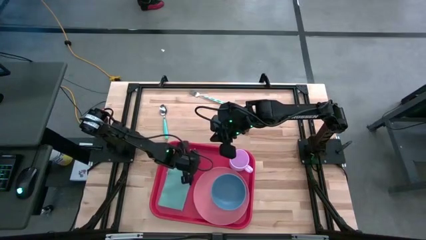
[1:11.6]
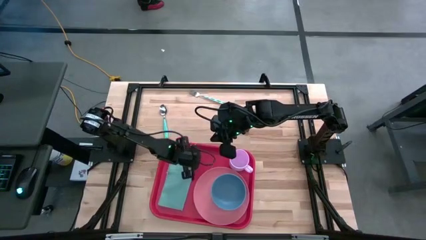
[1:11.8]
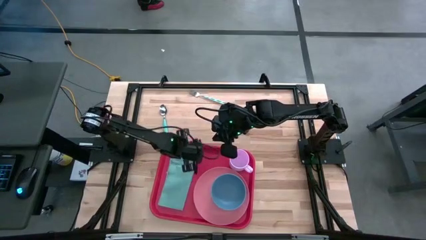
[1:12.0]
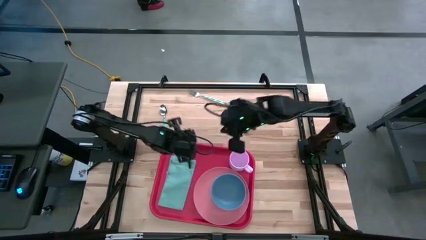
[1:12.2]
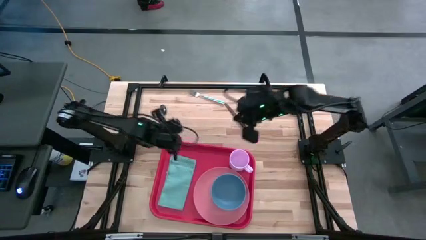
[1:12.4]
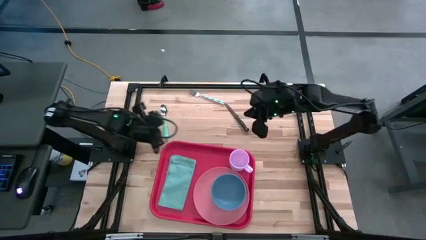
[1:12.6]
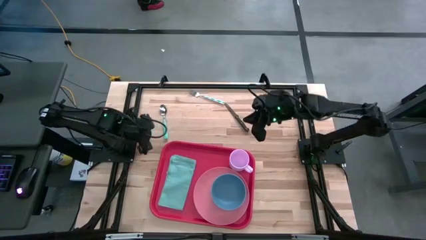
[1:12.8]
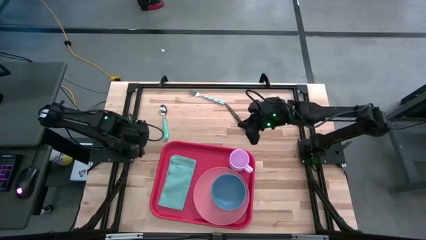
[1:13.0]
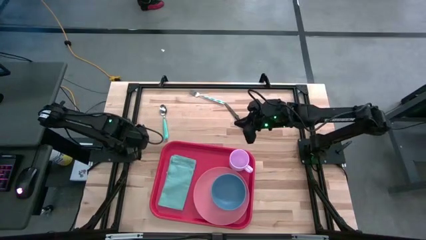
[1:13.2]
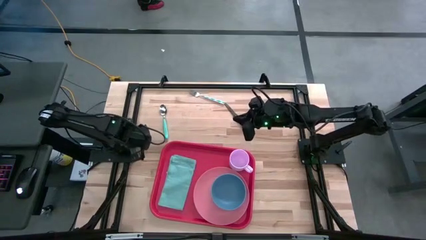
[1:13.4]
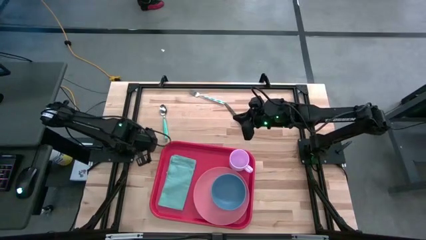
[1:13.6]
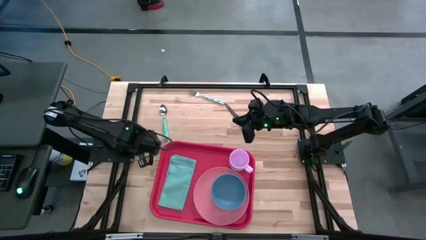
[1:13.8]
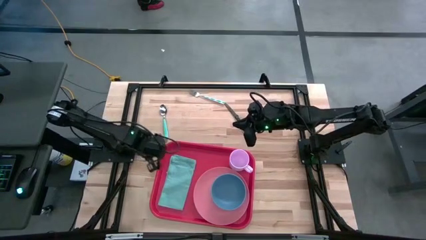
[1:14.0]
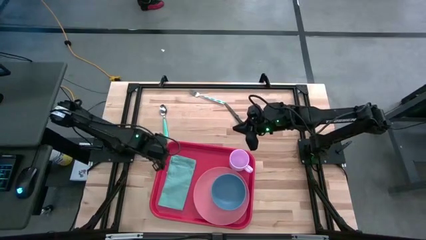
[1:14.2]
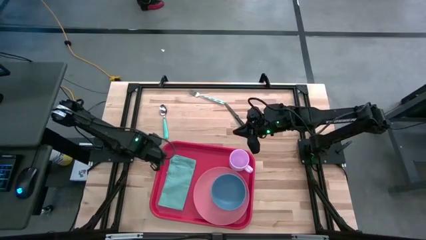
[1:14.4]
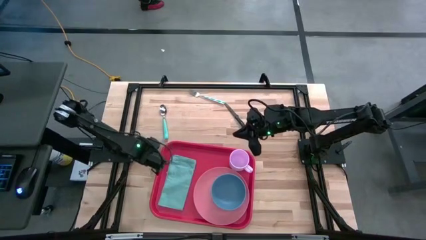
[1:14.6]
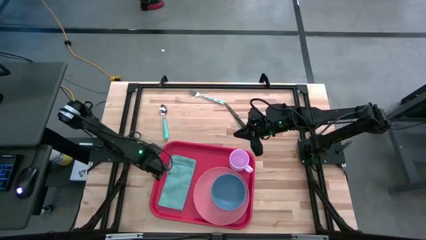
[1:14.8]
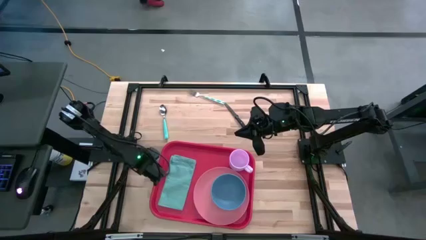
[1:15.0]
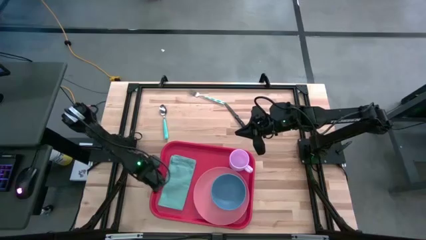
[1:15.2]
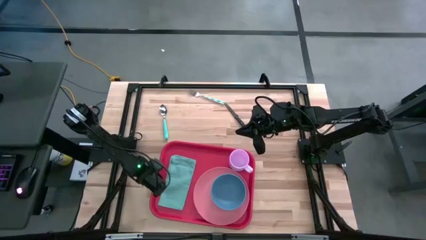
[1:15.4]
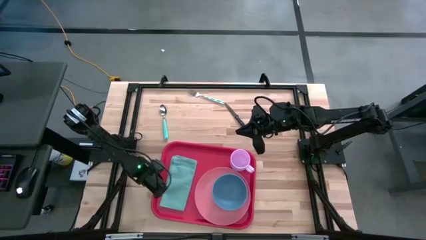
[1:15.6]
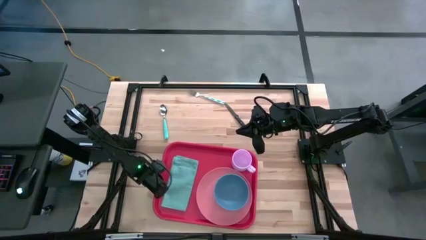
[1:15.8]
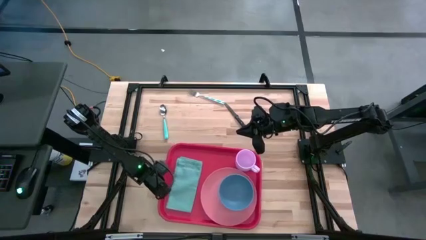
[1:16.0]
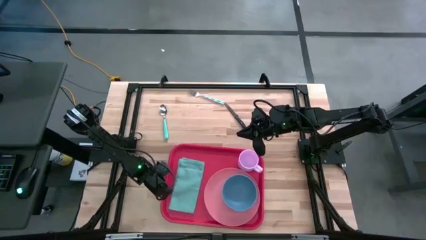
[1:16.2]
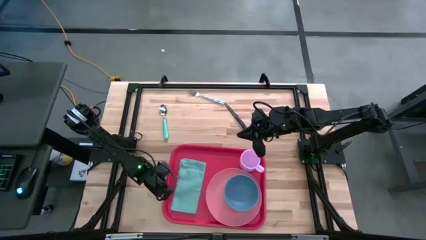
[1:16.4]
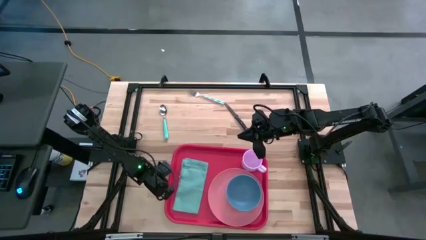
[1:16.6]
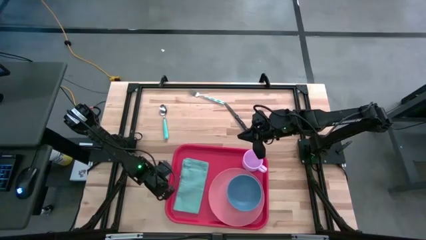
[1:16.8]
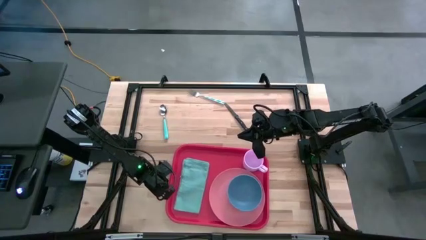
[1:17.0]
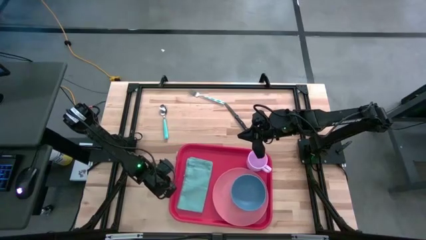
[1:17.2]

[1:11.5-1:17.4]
Task: Set up tray
Adjust the red serving tray

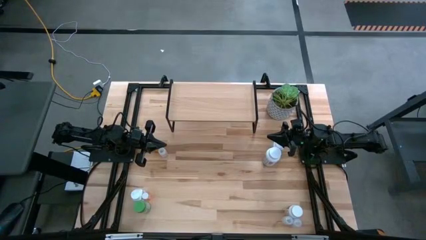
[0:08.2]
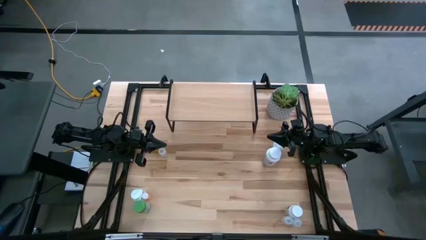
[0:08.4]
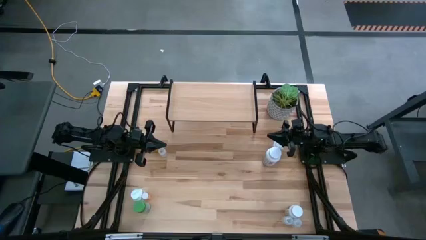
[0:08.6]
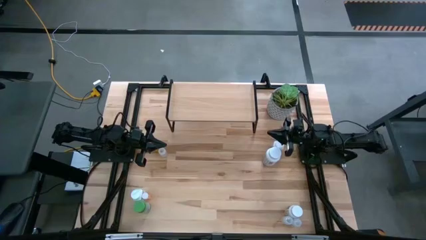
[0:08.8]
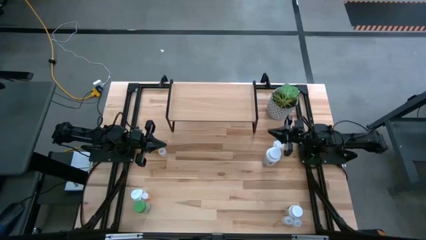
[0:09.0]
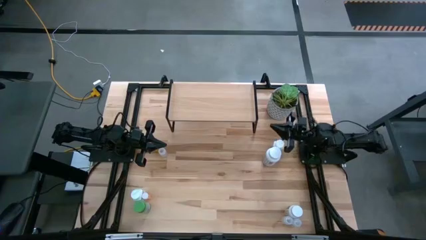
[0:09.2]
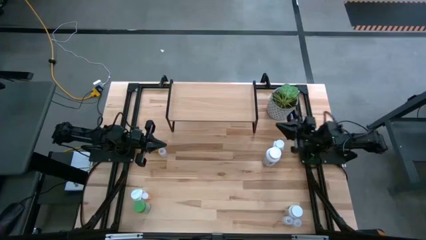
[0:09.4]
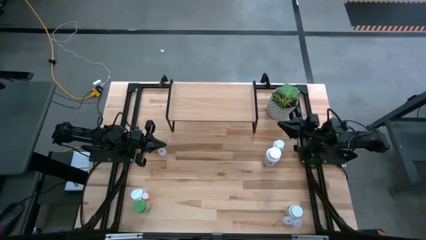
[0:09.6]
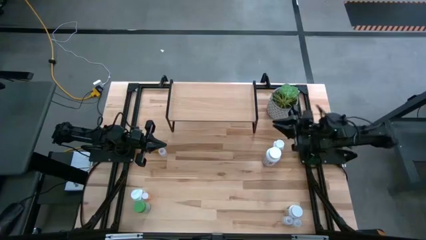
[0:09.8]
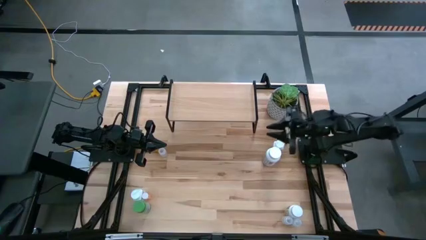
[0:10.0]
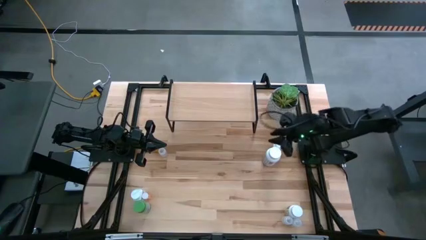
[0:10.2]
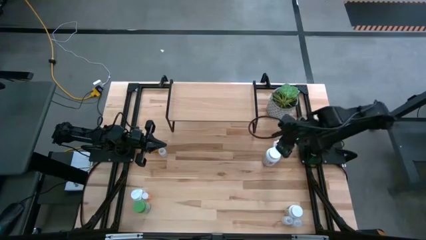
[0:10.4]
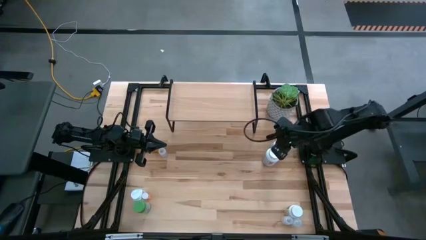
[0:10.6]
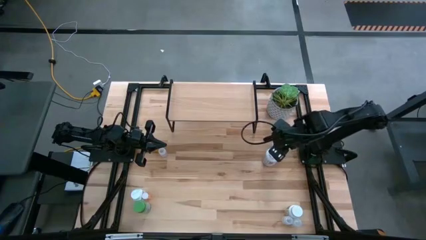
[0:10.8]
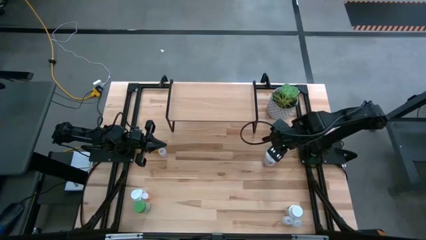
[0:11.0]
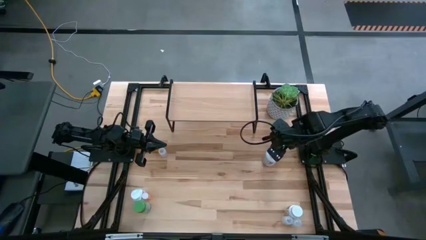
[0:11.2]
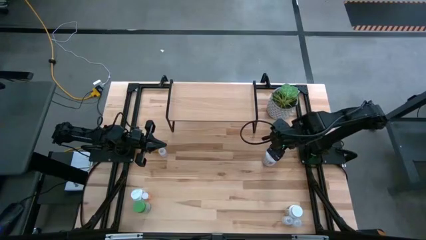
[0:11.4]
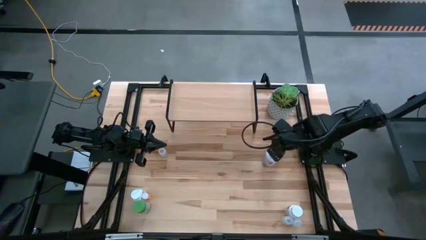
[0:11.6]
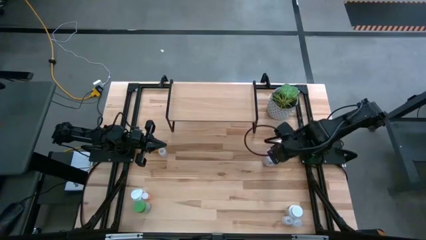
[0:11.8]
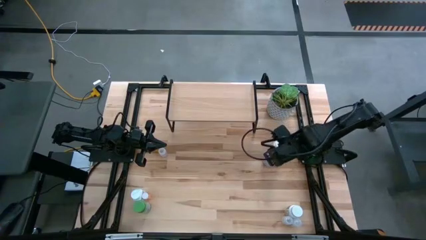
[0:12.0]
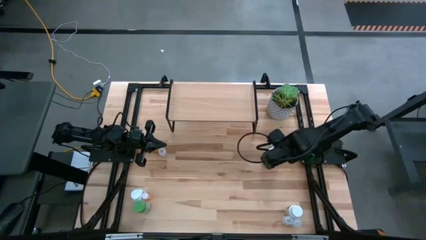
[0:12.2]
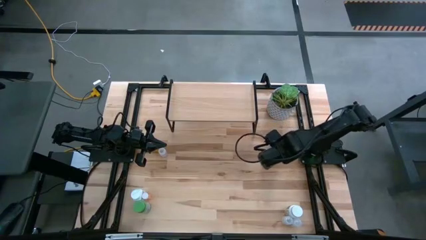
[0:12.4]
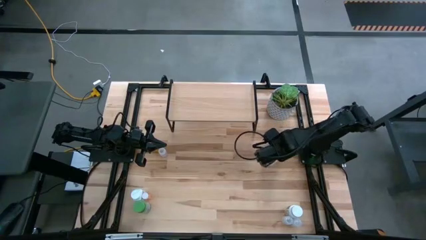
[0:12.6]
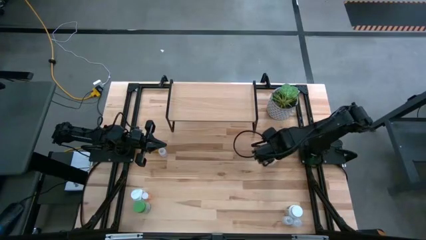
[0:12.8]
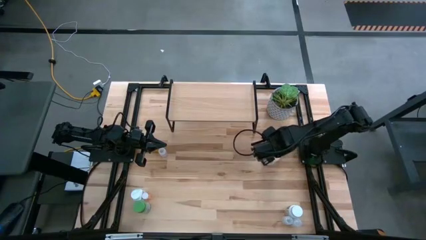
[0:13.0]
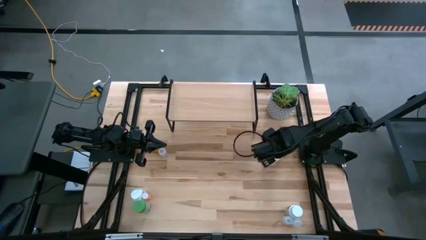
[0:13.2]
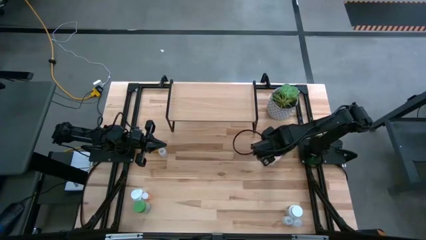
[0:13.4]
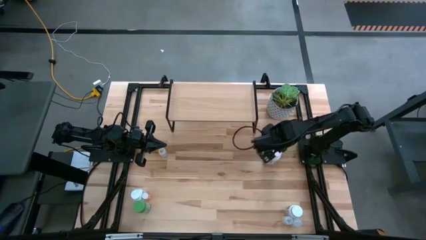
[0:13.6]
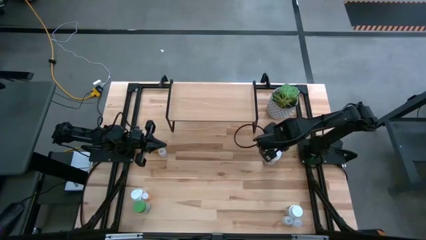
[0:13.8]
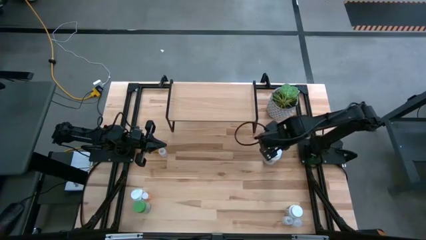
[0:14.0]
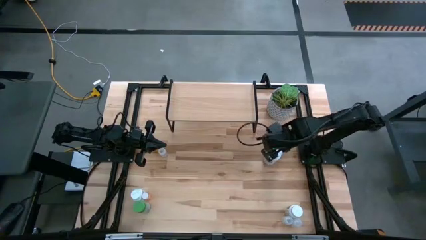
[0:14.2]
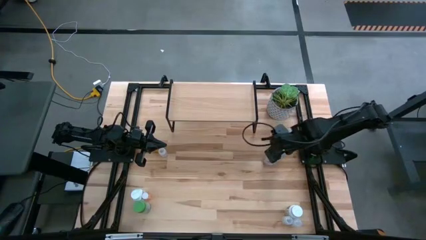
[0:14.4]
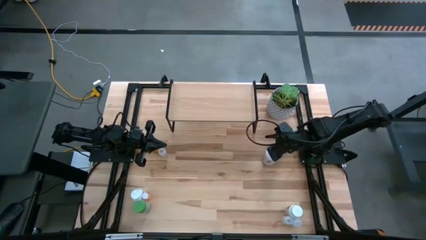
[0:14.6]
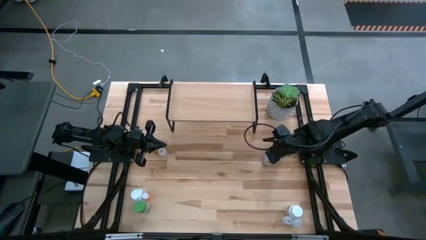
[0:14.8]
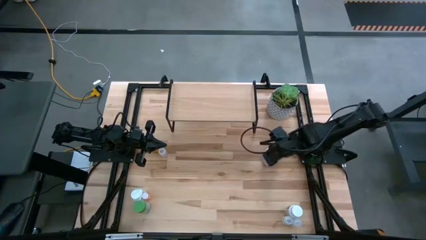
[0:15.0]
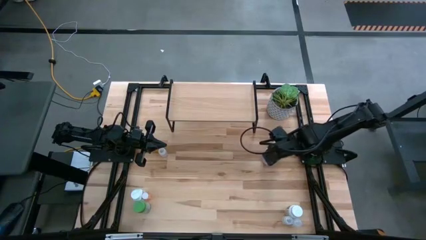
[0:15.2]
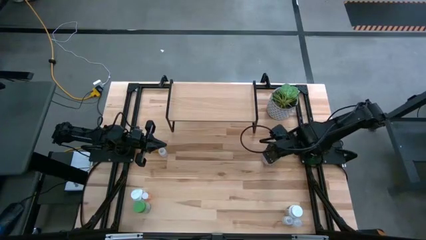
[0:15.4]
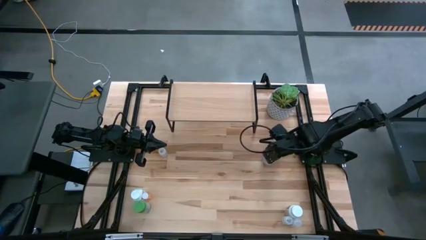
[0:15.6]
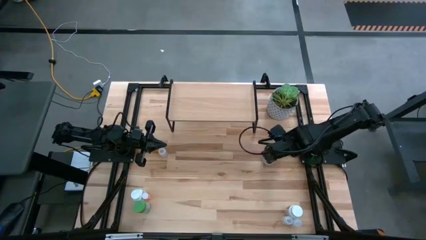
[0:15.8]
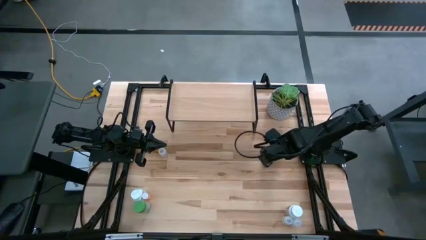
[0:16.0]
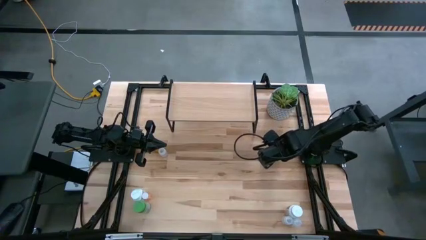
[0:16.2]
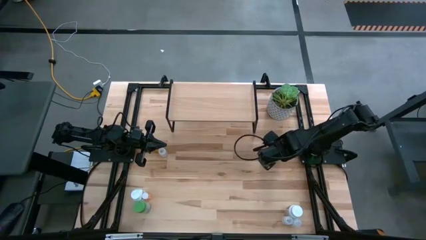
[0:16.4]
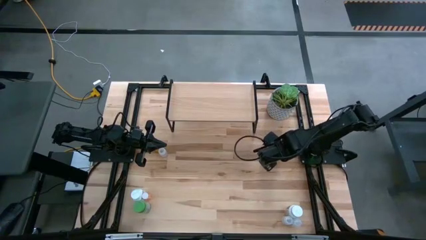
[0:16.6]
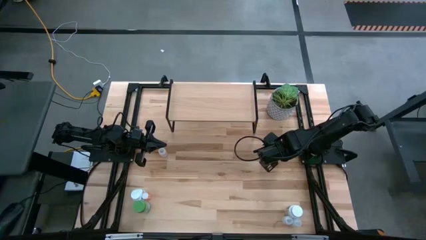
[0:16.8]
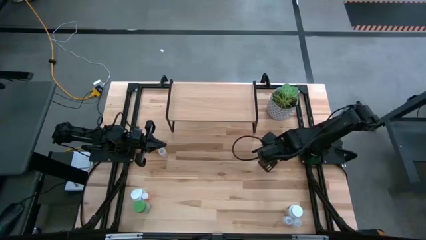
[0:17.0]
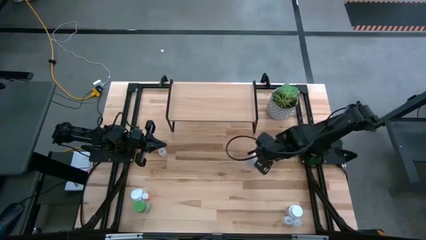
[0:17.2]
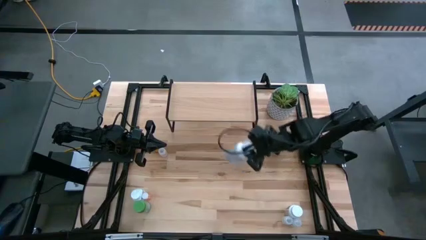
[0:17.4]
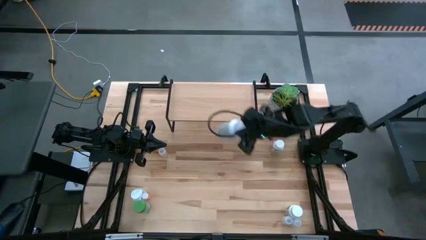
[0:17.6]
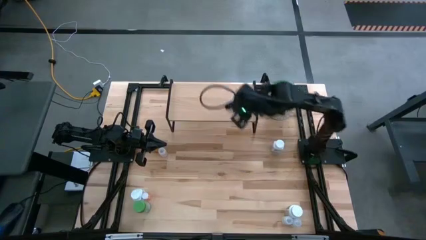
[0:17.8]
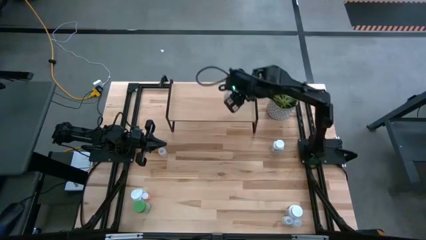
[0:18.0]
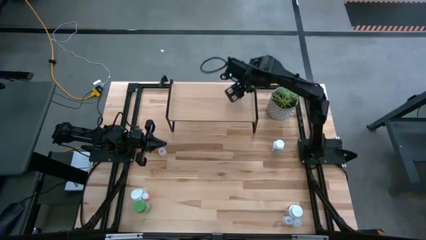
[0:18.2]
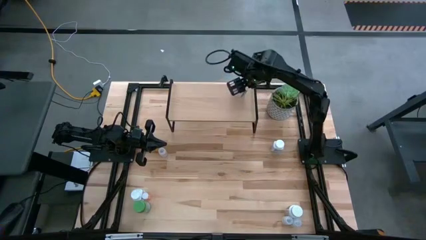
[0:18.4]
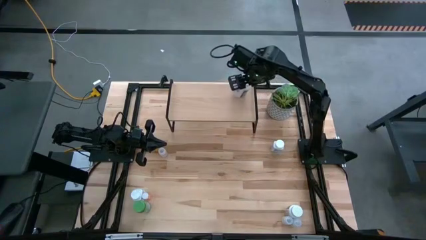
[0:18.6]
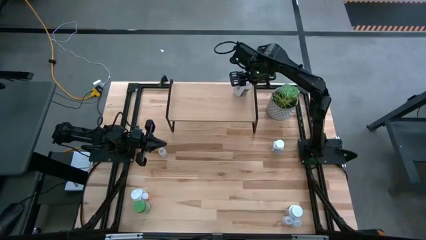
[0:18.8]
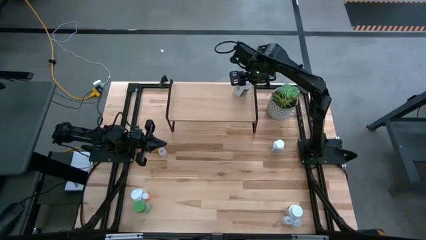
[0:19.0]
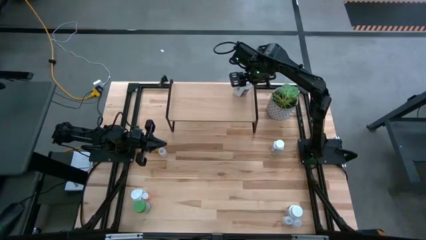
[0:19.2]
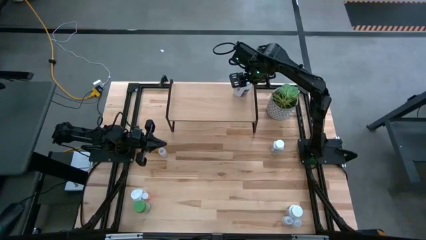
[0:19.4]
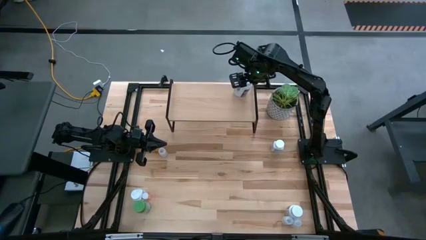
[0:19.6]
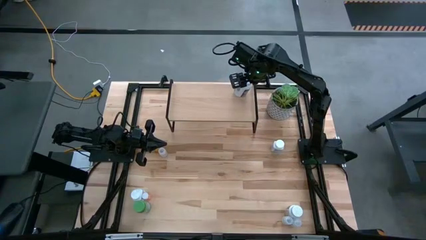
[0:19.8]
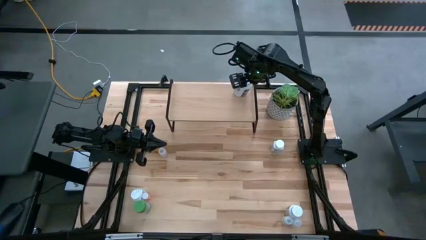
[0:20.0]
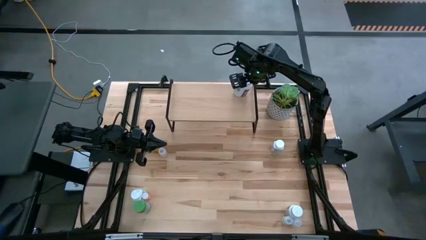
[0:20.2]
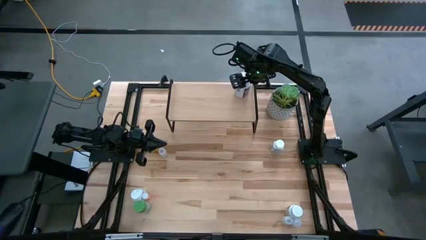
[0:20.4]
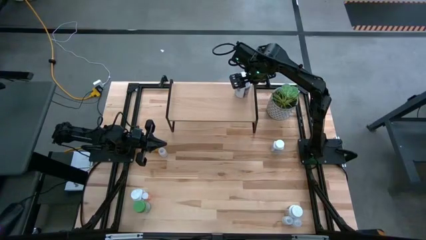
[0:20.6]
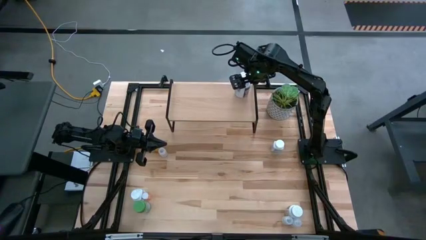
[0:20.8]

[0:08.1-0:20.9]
Task: Pick and place medicine bottles onto shelf by color
Put the big white pill bottle on the shelf
